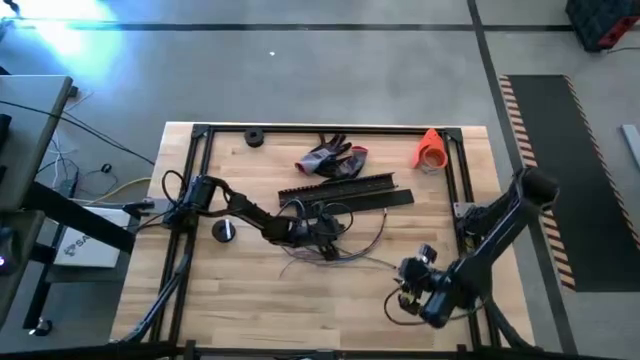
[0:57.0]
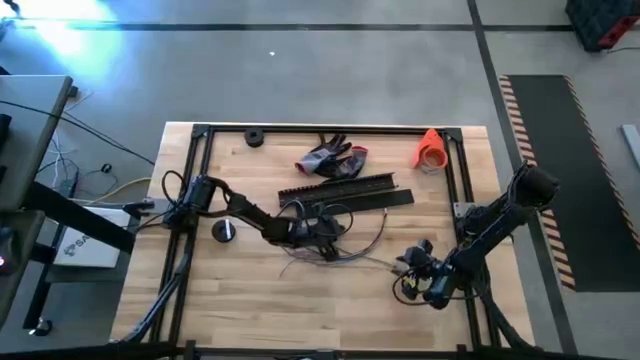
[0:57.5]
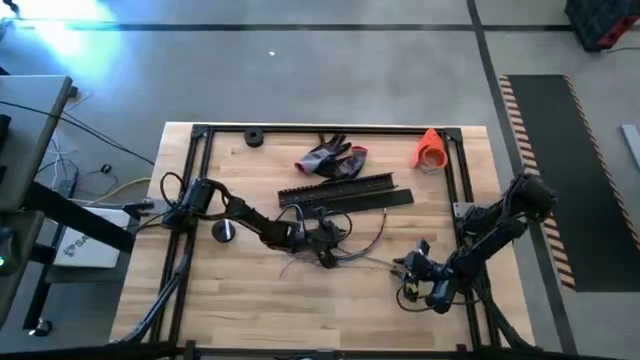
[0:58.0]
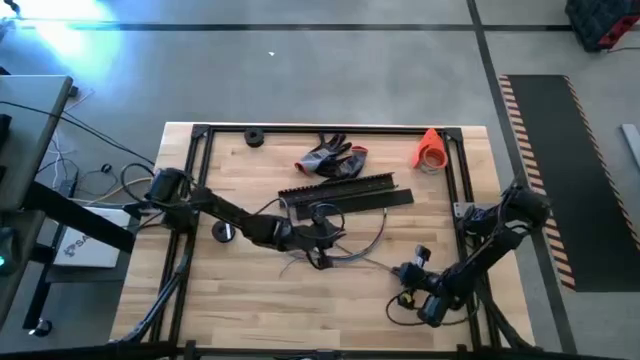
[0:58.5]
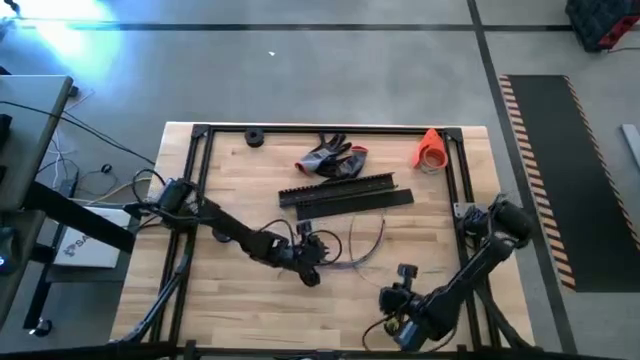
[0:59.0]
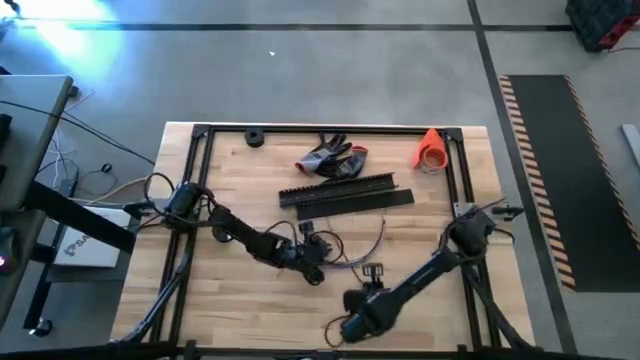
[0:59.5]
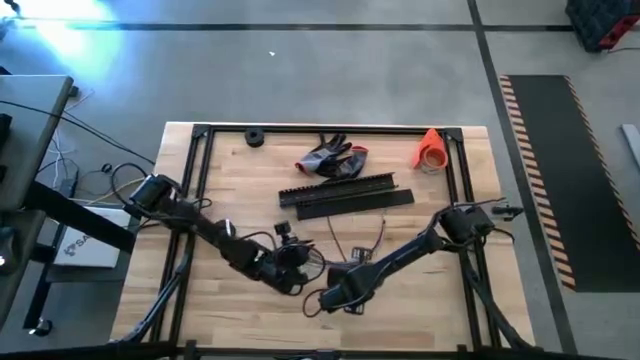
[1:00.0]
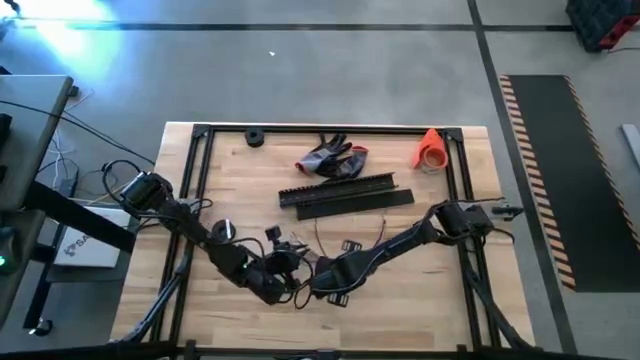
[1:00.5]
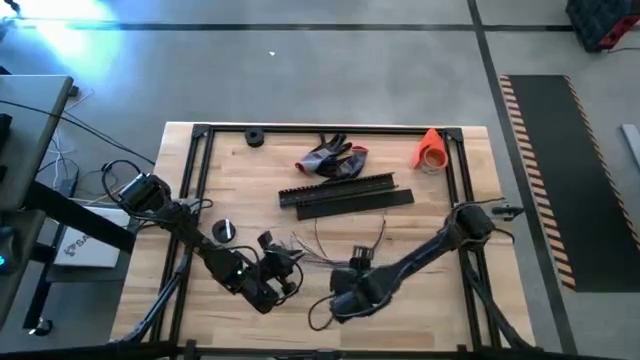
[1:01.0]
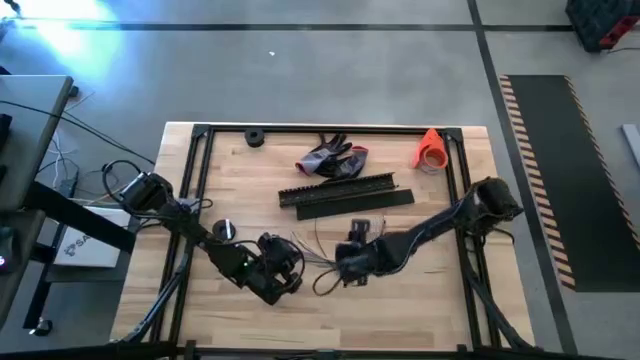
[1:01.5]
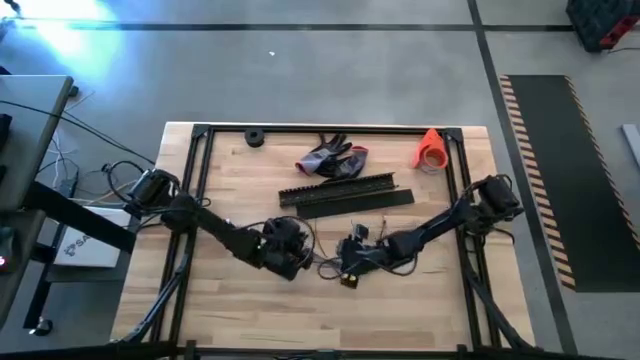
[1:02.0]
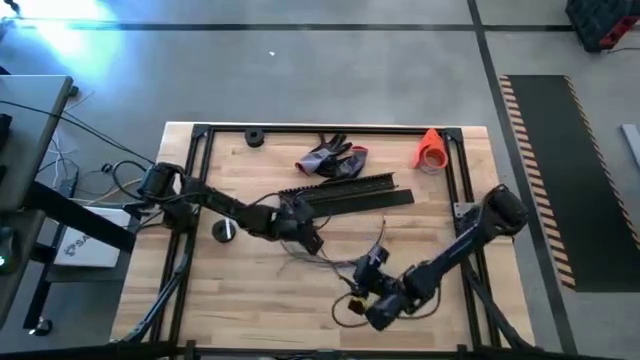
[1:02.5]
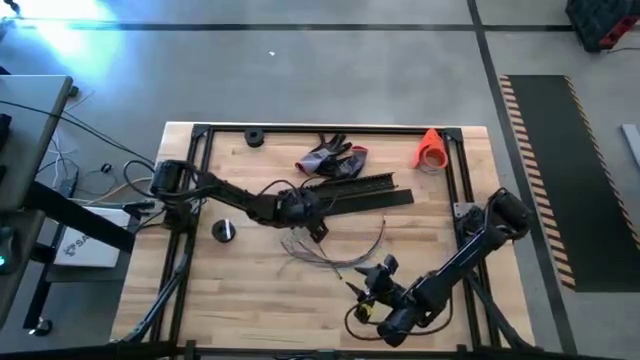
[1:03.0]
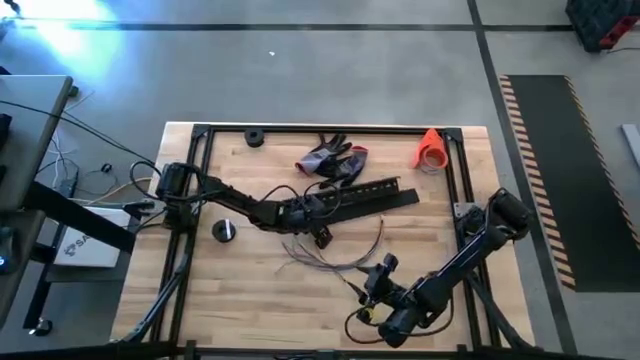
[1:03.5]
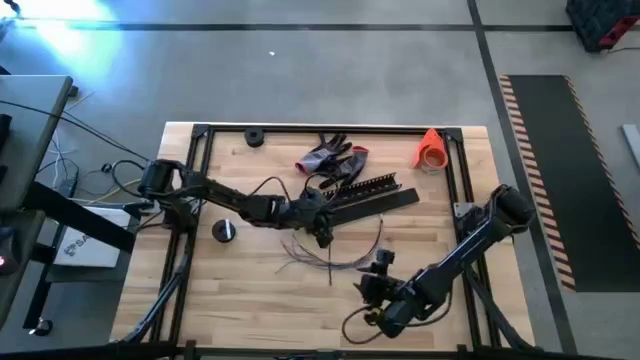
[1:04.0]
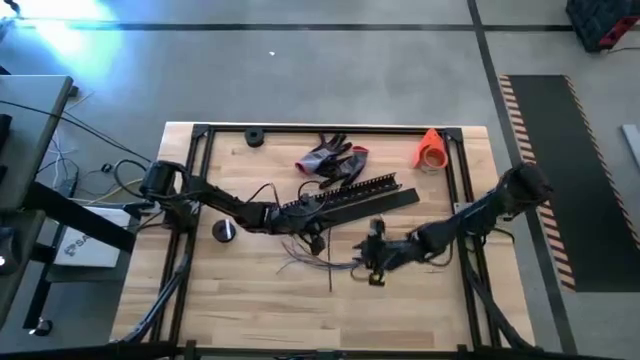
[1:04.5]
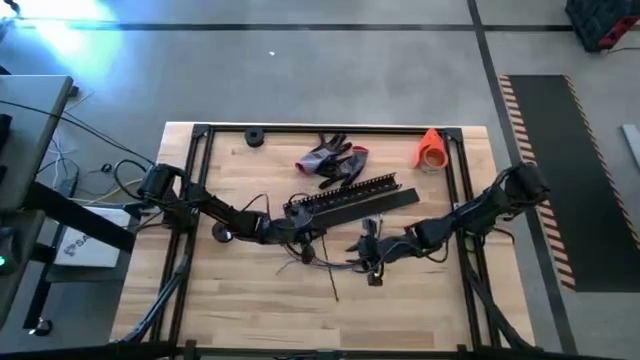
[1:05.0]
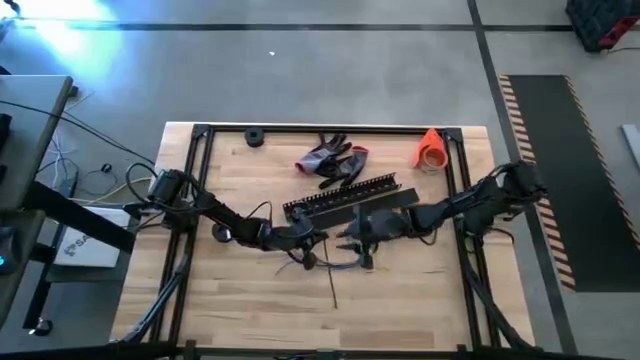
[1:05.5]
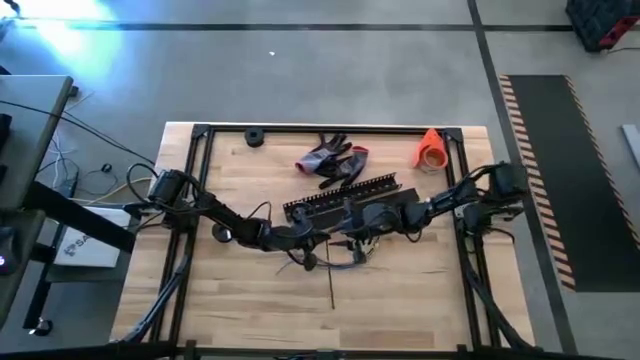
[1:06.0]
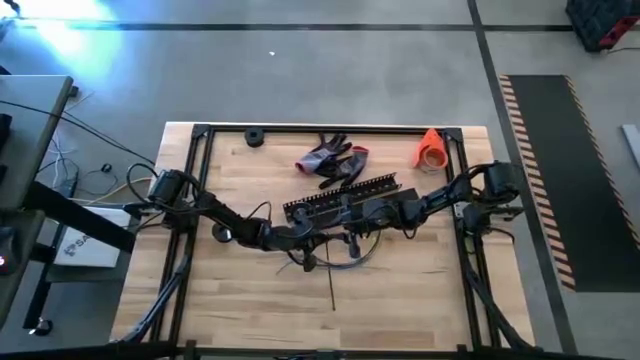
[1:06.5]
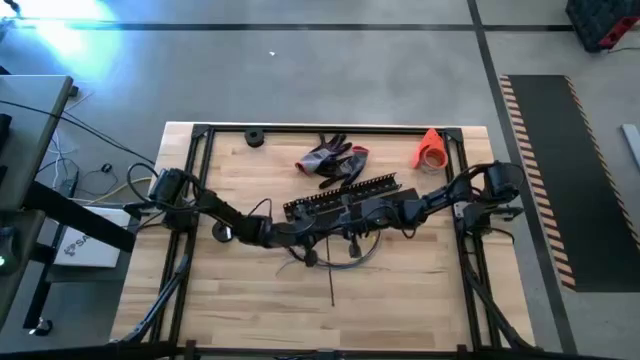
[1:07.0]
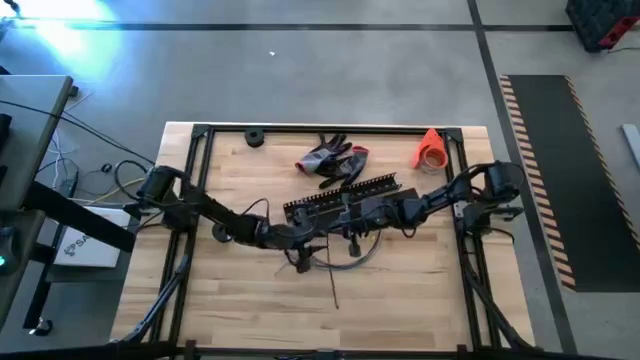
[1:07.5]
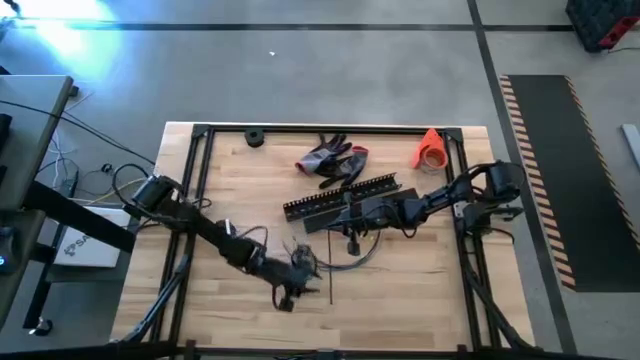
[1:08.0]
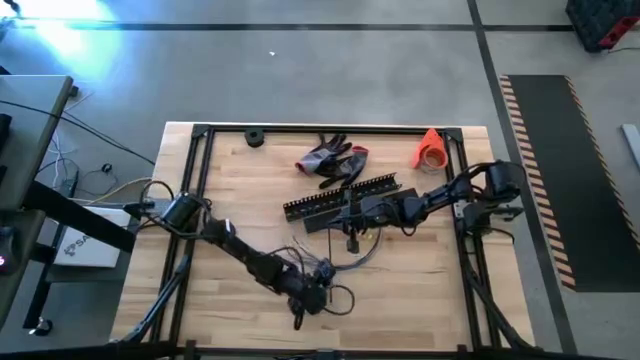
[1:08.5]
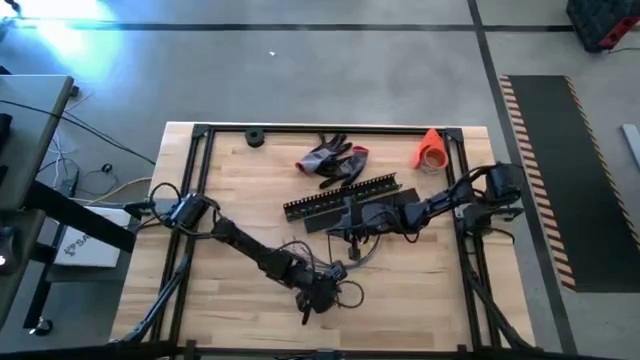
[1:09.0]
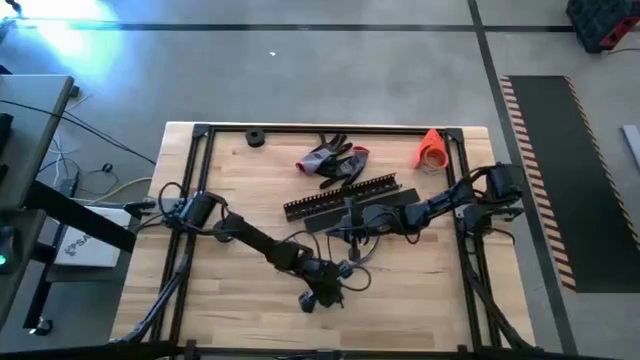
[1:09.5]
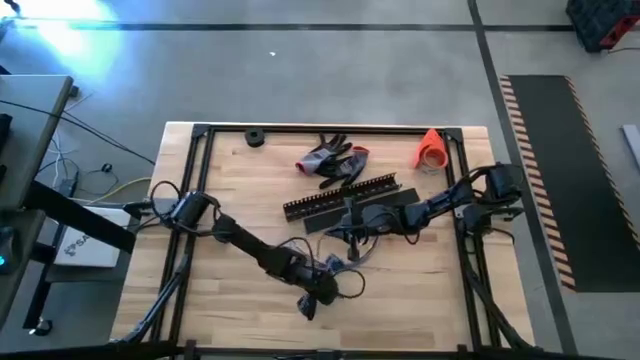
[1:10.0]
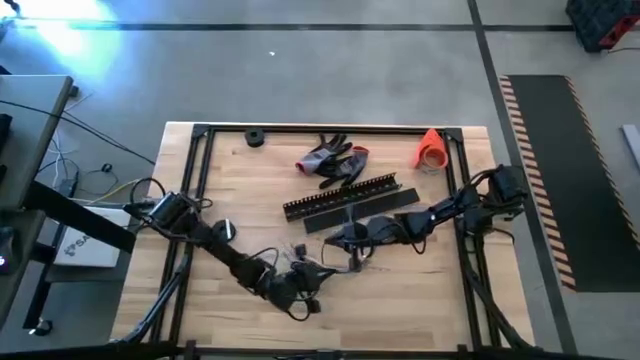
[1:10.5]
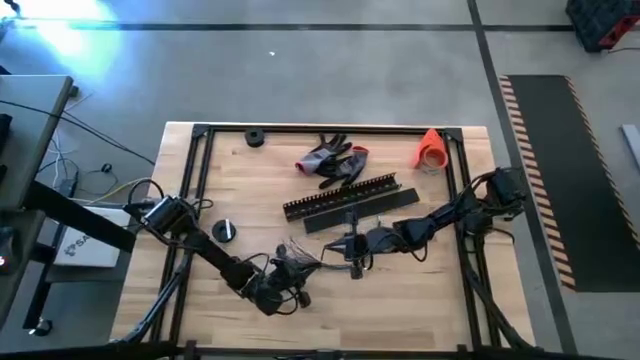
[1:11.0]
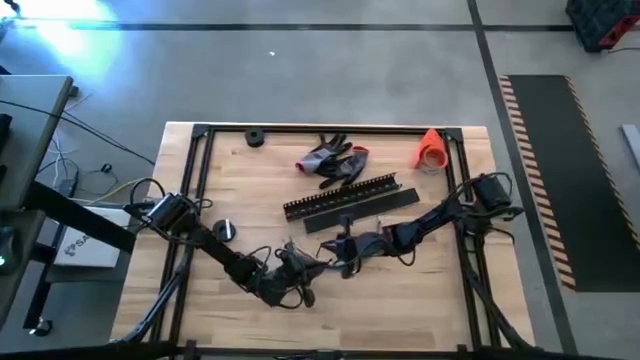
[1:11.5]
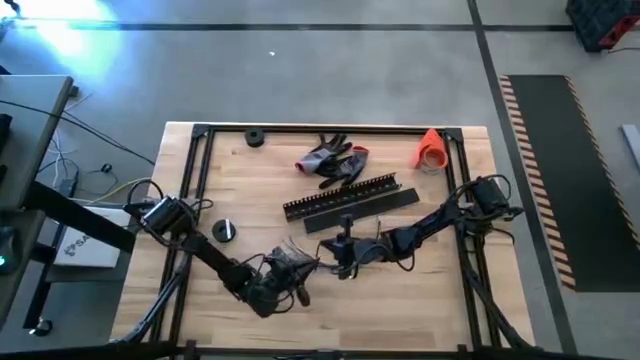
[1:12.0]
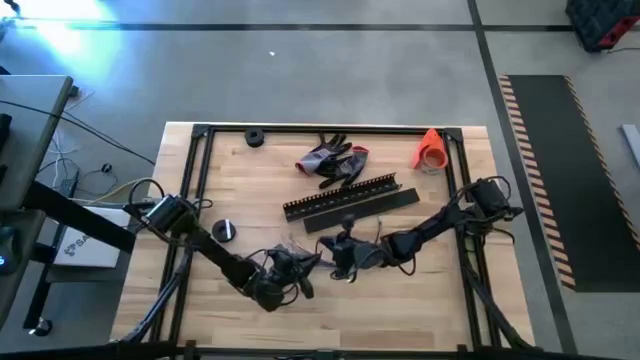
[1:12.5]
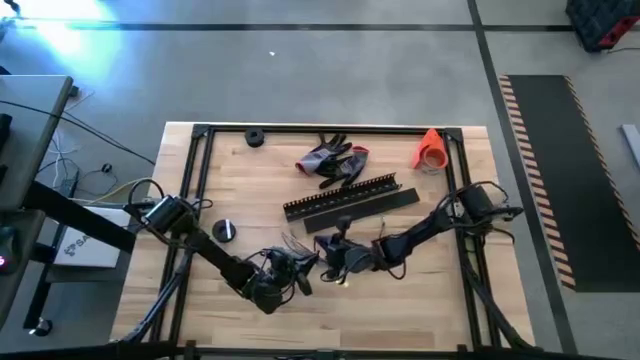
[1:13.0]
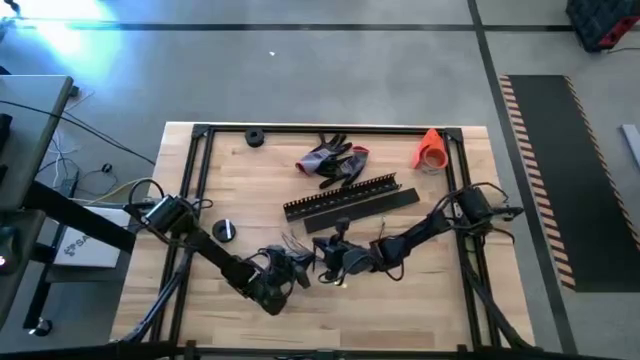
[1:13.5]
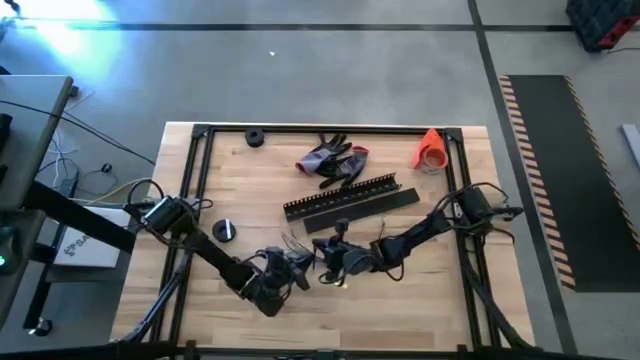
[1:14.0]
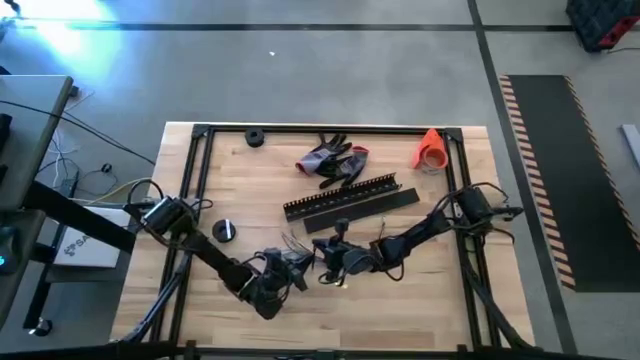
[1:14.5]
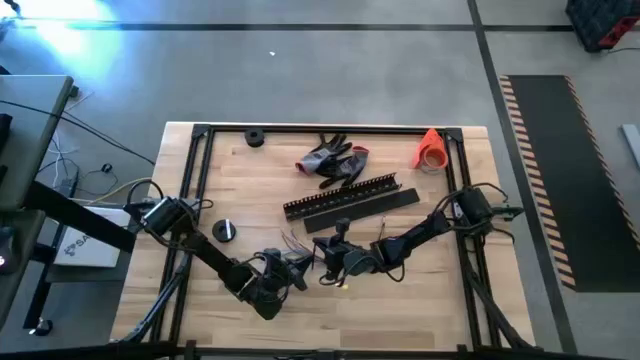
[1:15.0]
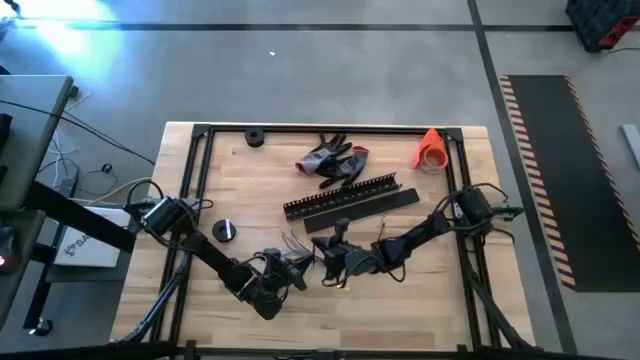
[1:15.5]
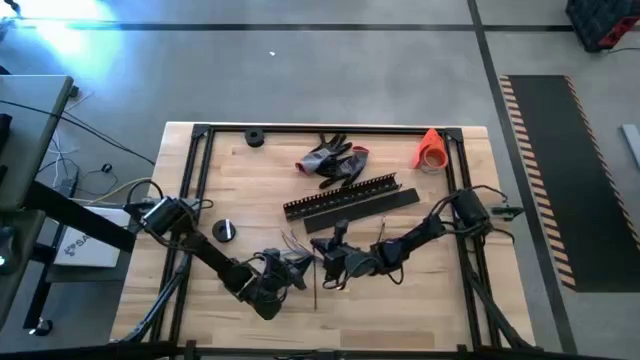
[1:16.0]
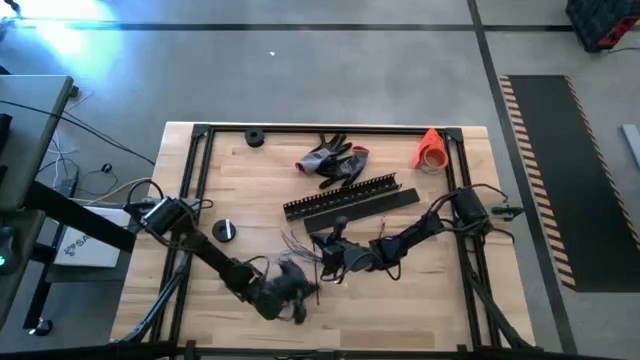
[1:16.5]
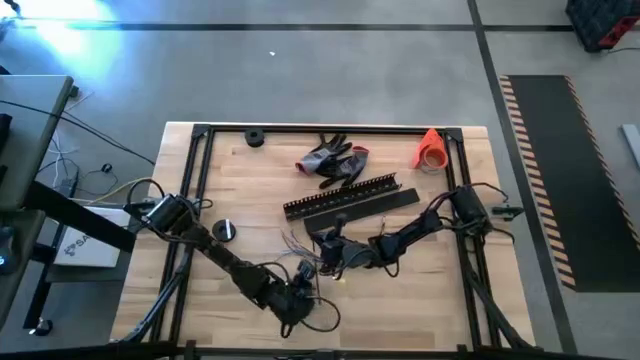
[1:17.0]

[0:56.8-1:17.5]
Task: Ziptie cables
Wrap the cables using a black zip tie

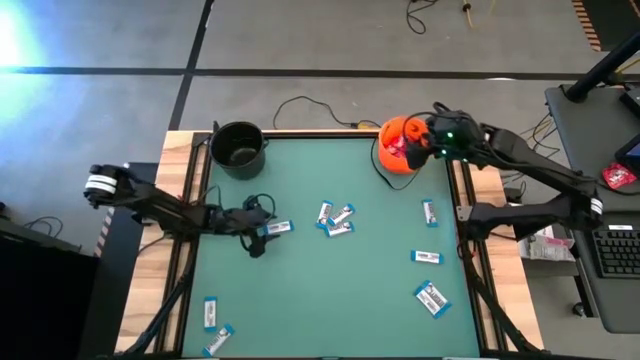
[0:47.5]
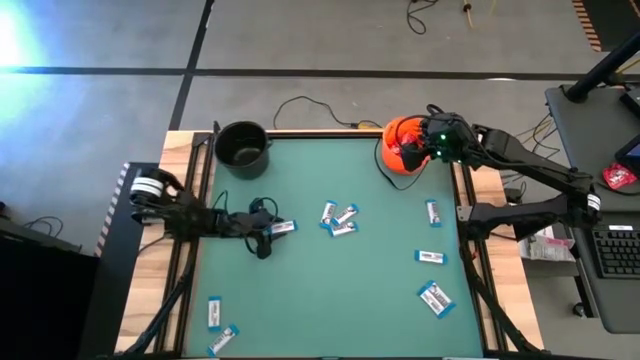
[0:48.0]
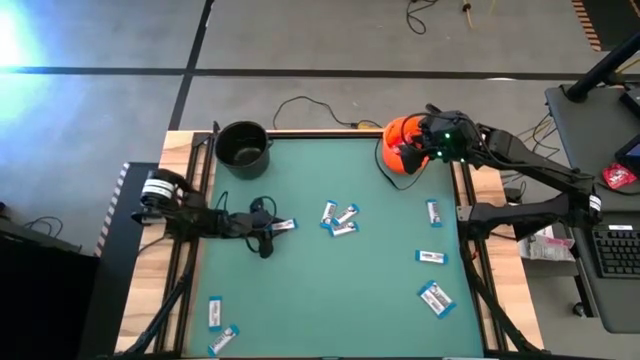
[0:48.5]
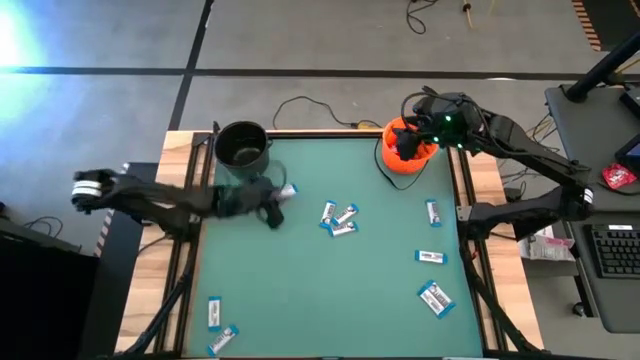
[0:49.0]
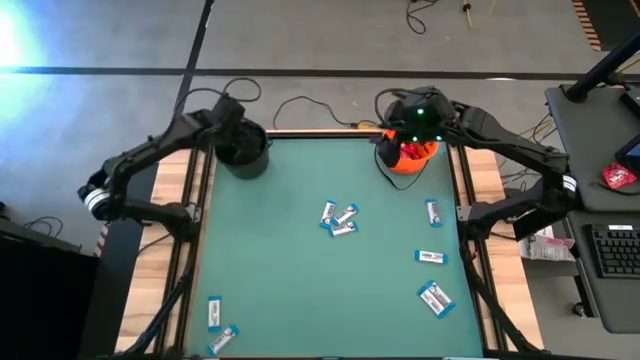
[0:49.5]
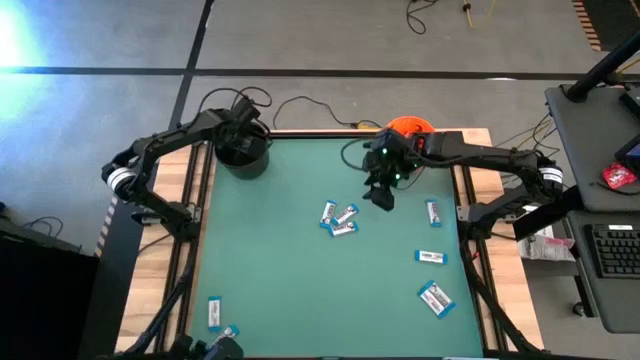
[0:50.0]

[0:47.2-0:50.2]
Task: Sort candy by brand, put in halloween buckets
Put the white candy into the black bucket
